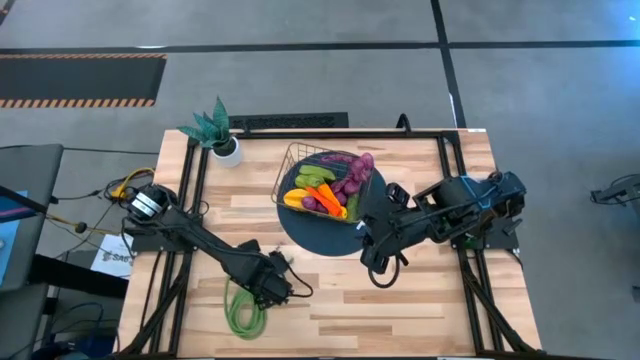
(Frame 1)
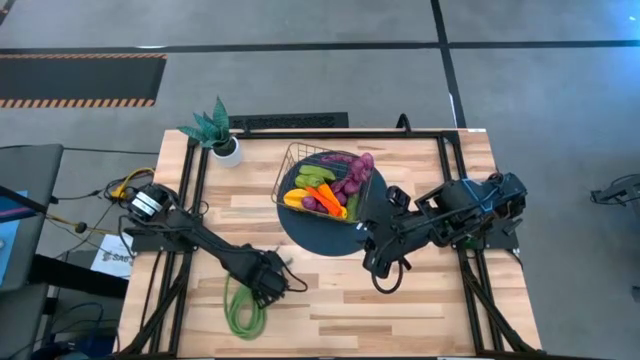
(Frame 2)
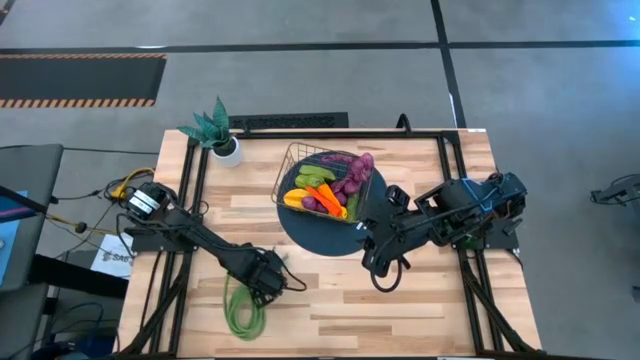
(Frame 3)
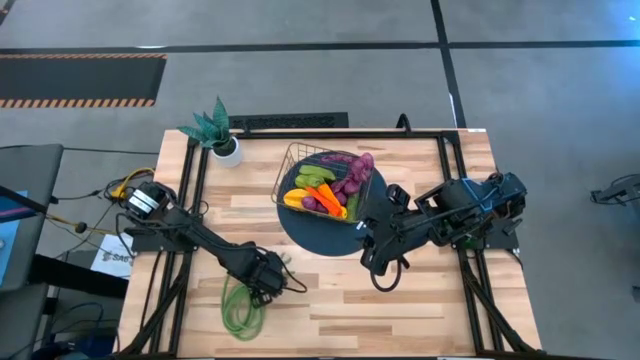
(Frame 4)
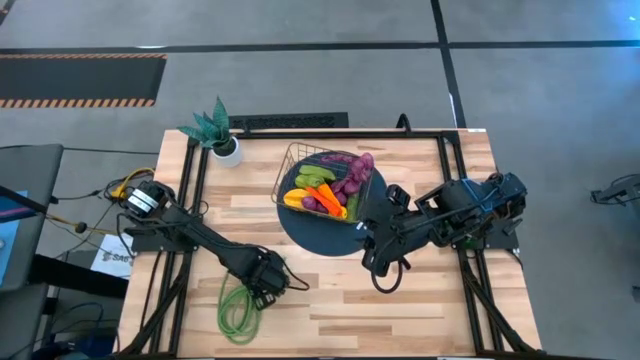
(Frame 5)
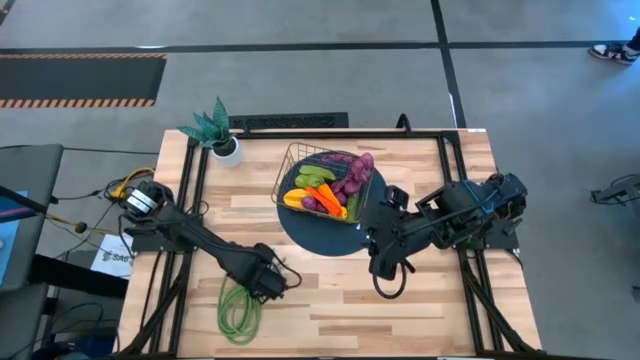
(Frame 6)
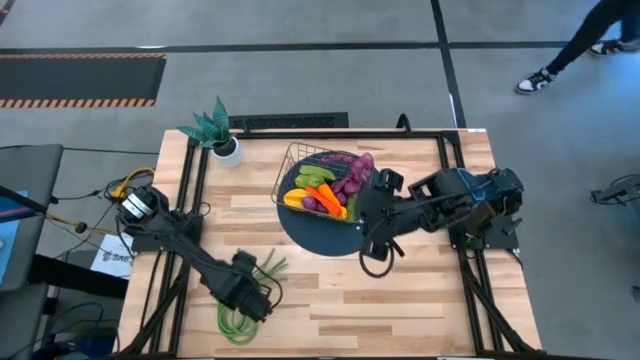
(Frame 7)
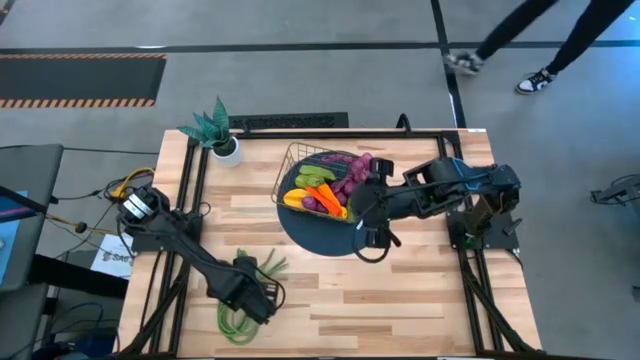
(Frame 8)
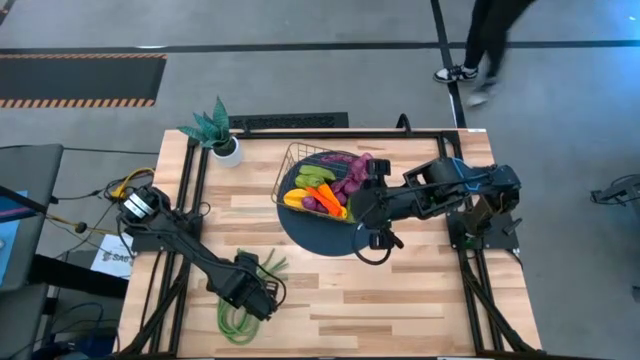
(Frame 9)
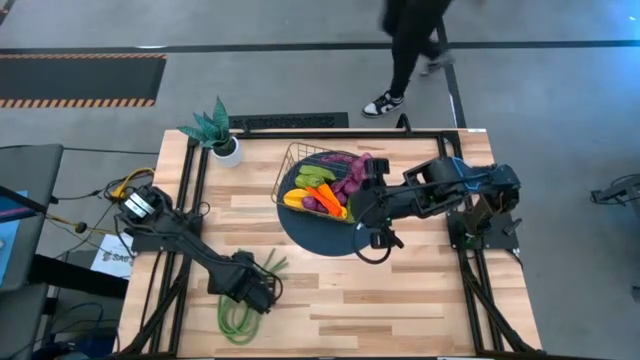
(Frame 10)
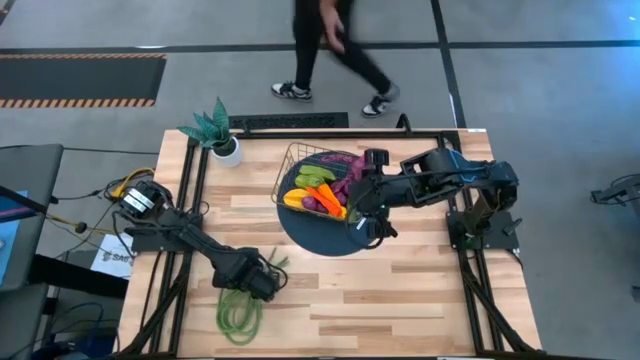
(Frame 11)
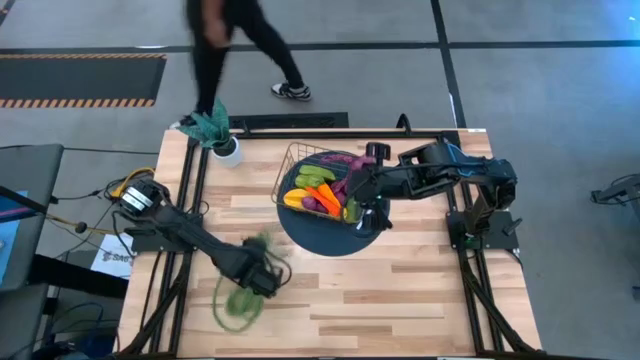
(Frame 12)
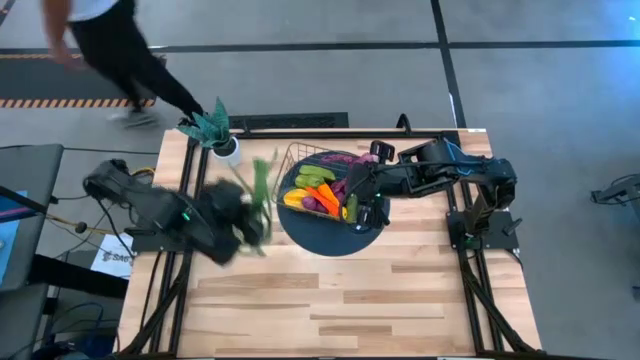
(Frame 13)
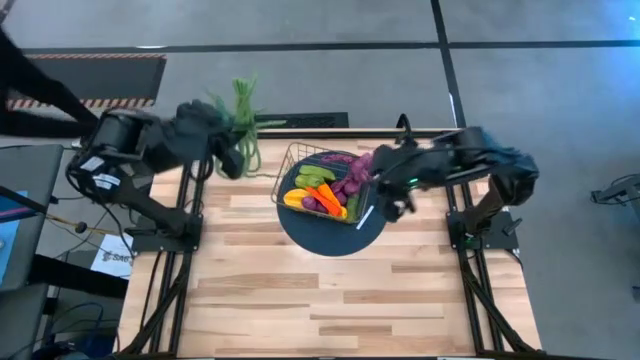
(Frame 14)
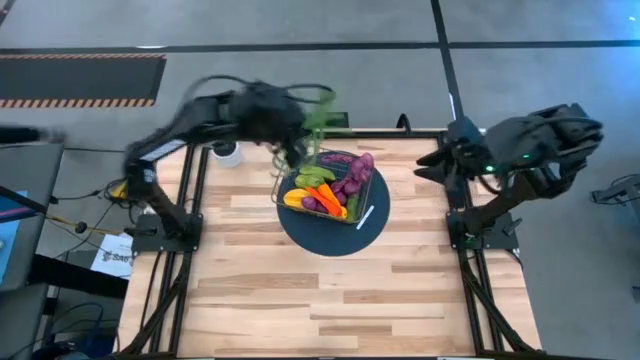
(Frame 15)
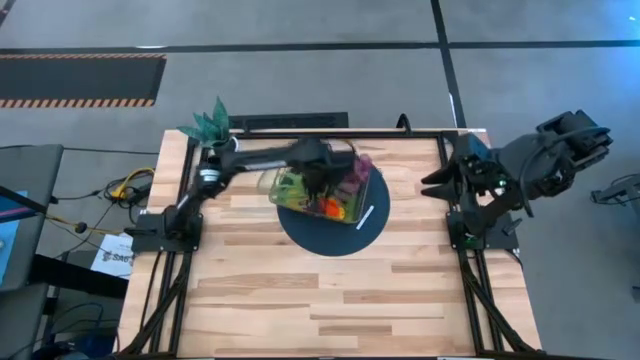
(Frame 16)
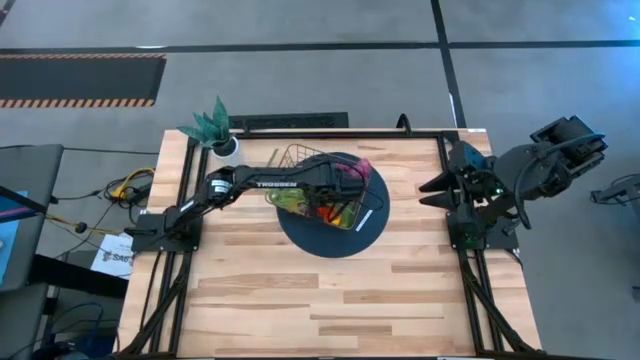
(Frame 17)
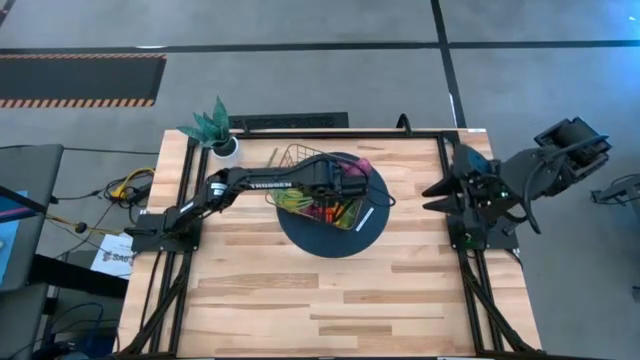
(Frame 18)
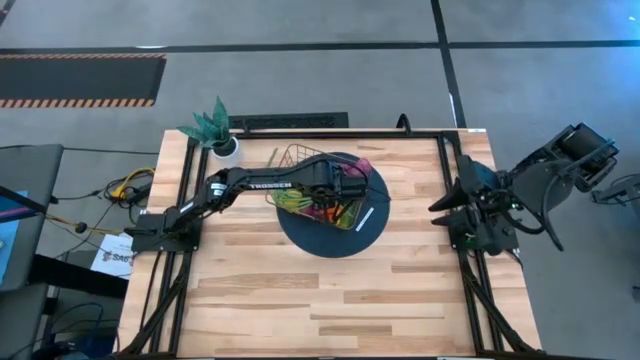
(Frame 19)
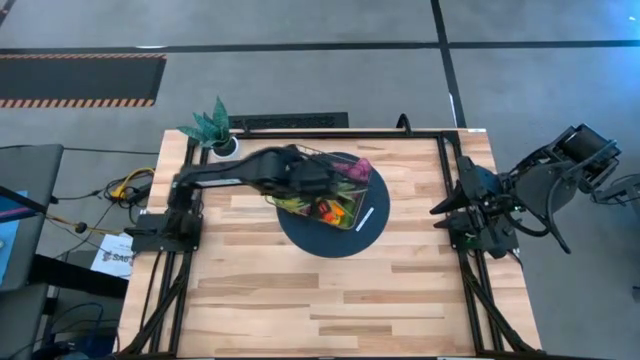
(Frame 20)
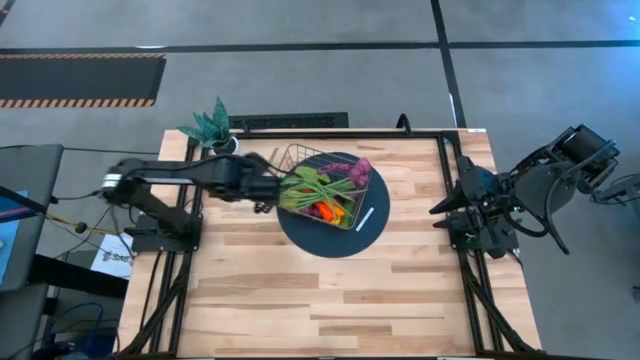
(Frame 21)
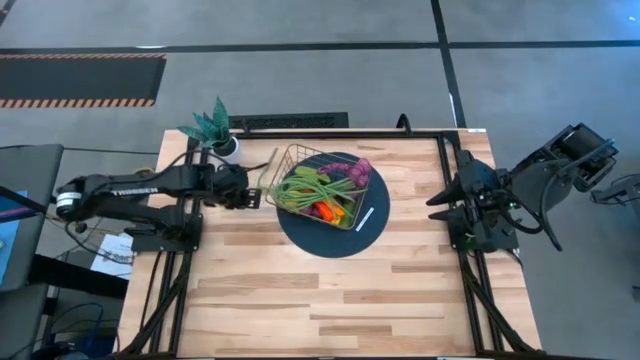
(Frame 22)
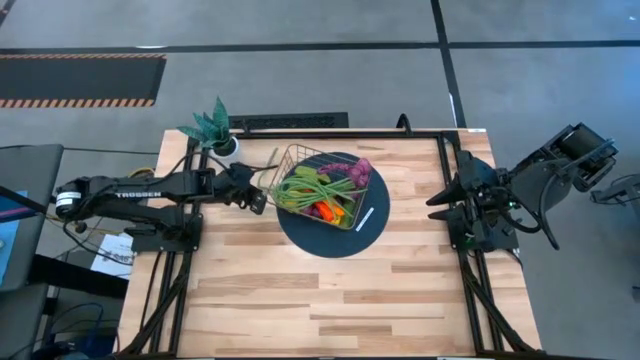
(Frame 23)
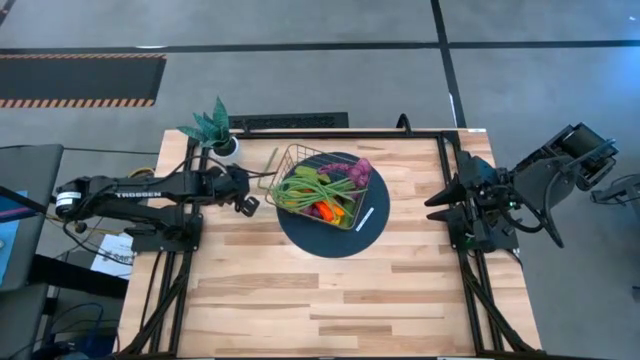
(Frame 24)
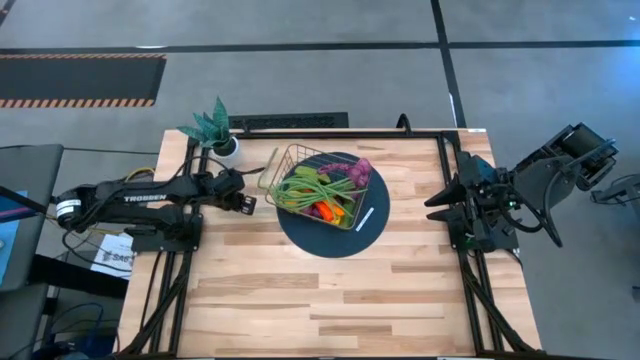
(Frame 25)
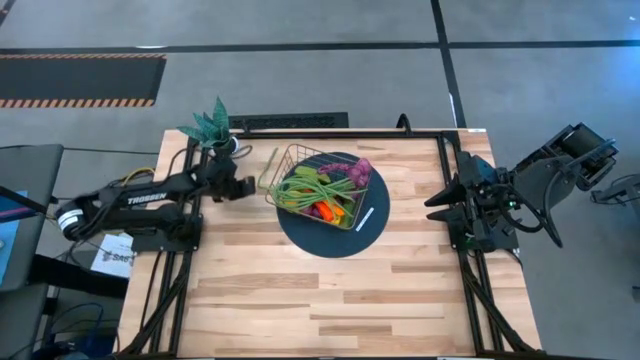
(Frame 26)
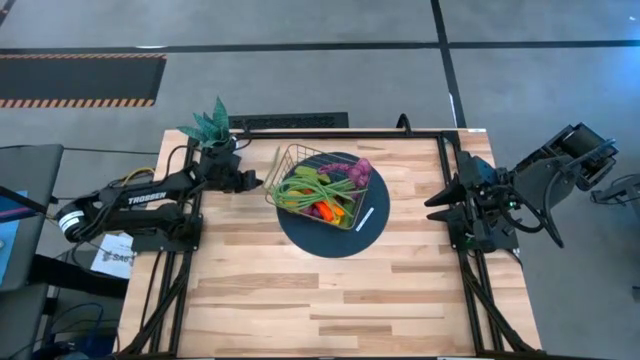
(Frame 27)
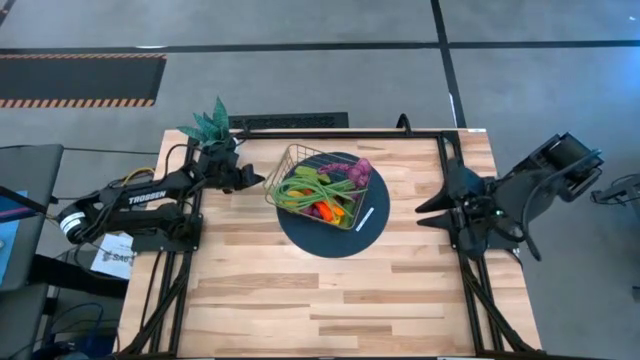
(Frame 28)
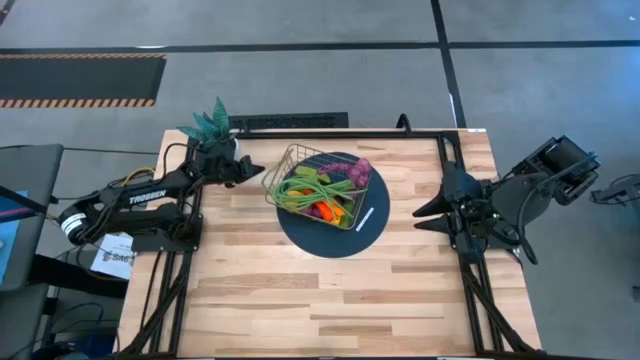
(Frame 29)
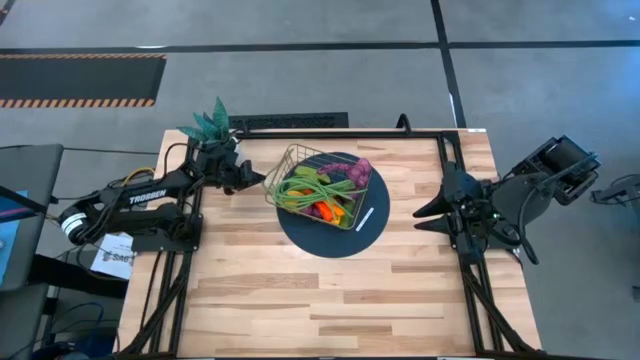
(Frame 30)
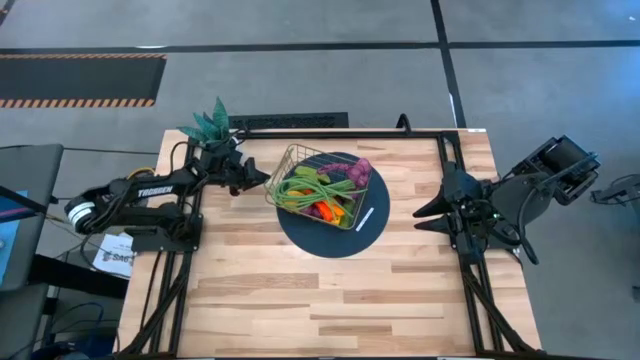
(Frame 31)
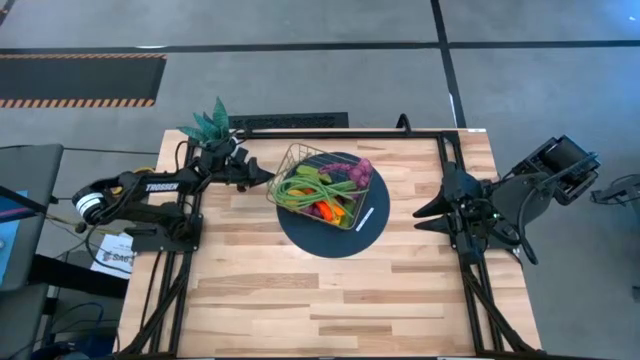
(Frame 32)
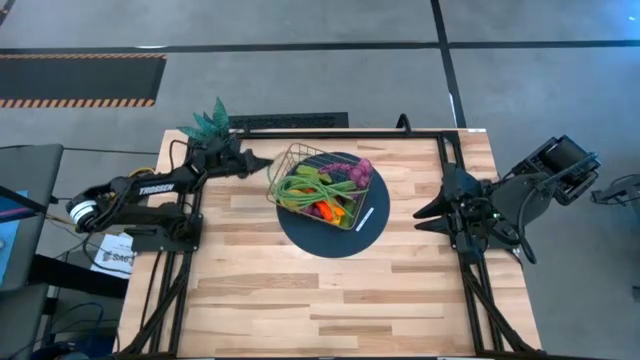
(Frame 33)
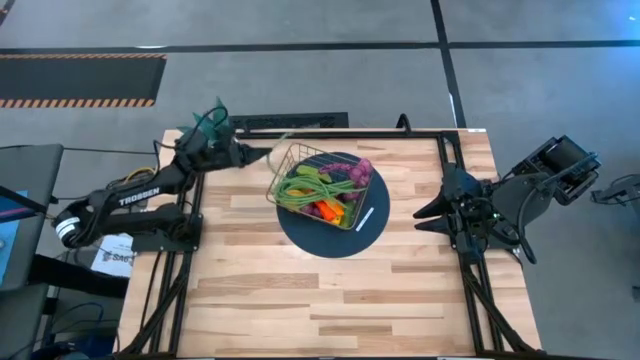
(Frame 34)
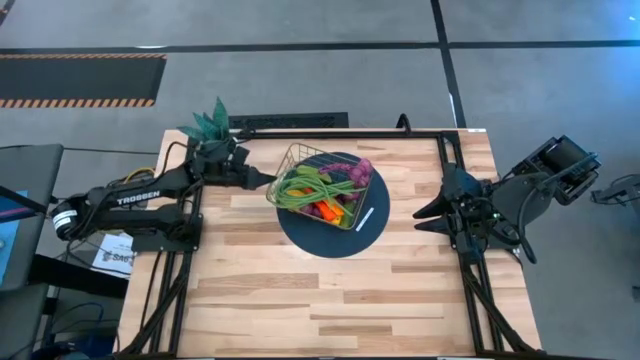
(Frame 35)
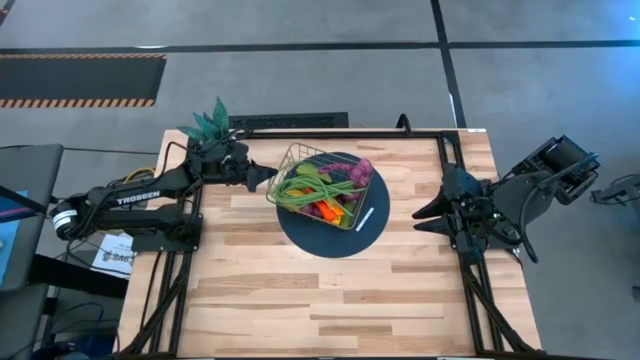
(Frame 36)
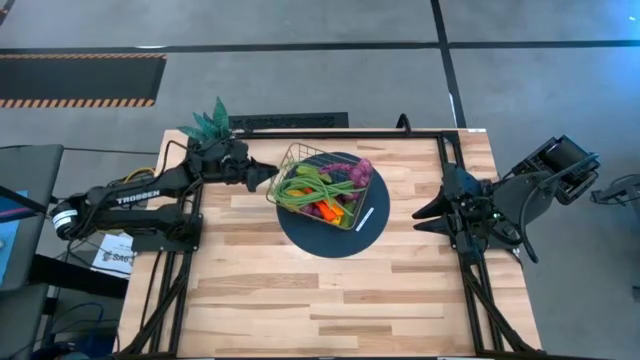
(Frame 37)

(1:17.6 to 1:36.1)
Task: Build produce basket
Put the green beans into the wire basket

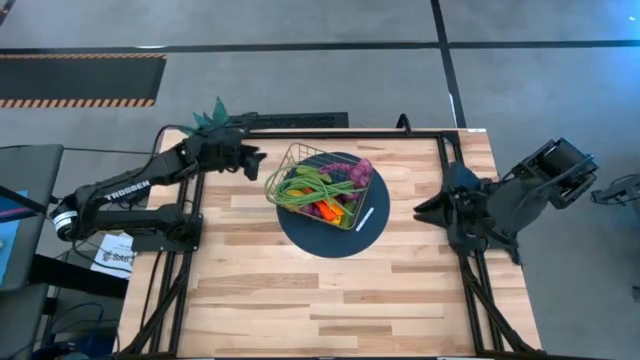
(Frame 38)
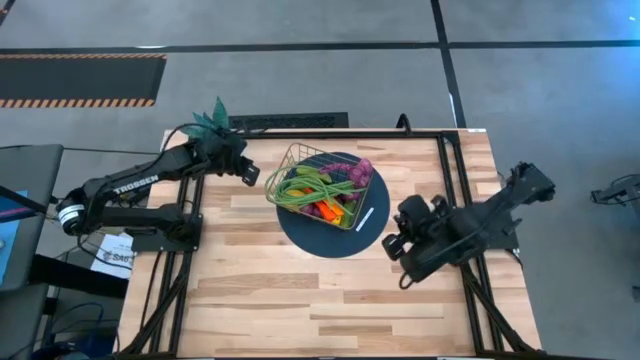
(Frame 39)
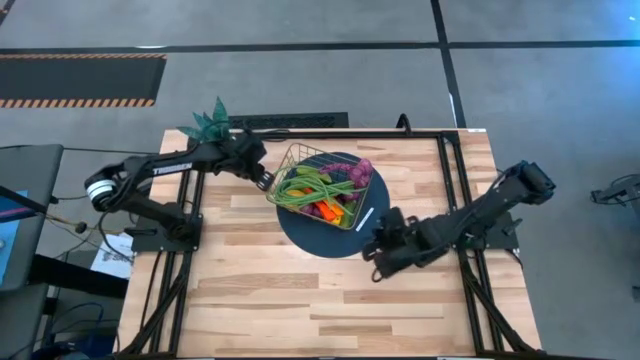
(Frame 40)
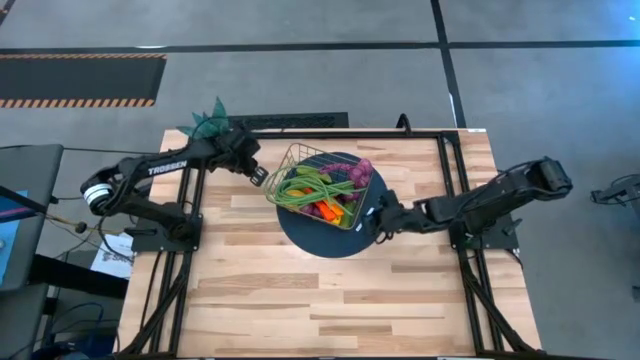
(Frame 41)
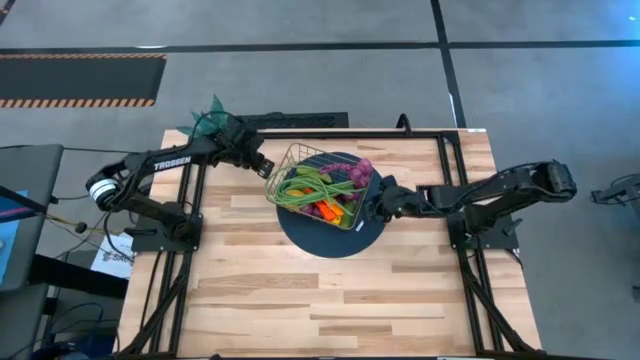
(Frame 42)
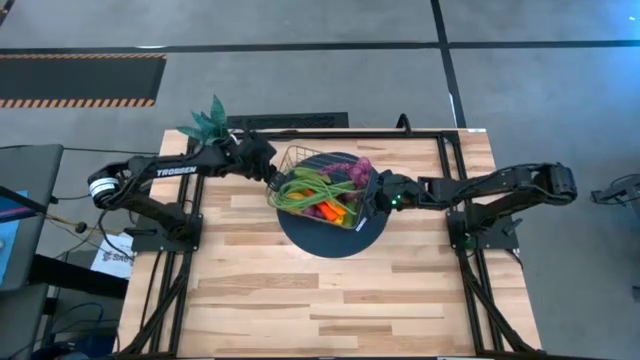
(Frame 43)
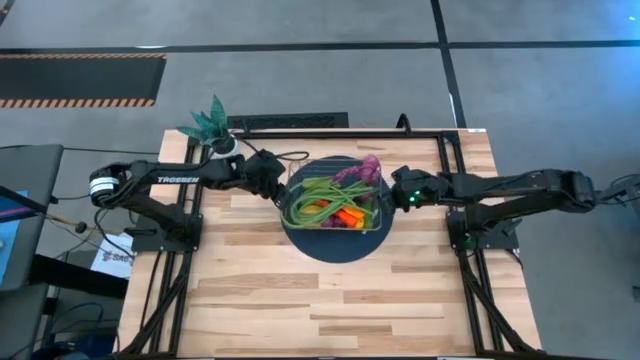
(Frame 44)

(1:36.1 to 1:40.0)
Adjust the wire basket
